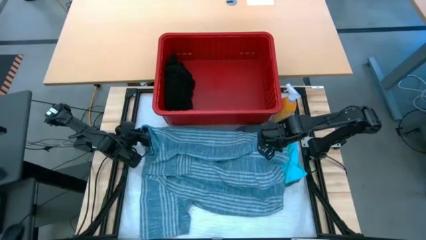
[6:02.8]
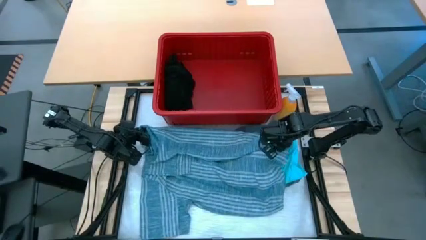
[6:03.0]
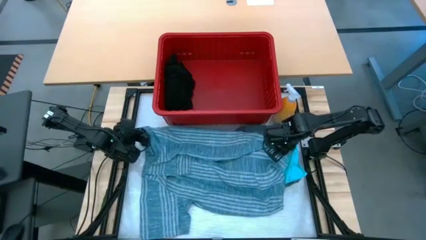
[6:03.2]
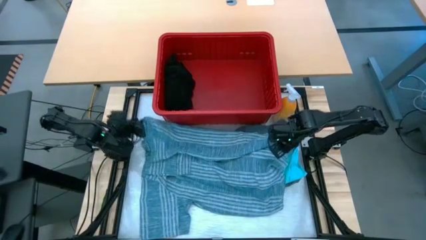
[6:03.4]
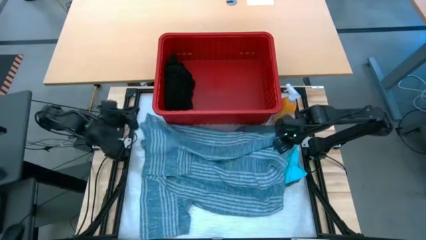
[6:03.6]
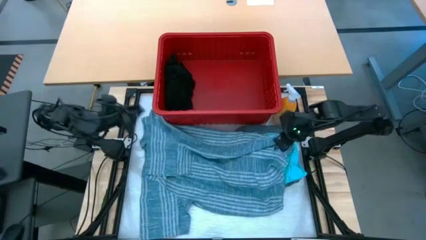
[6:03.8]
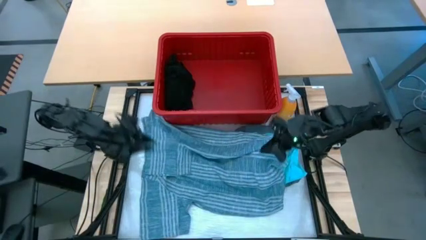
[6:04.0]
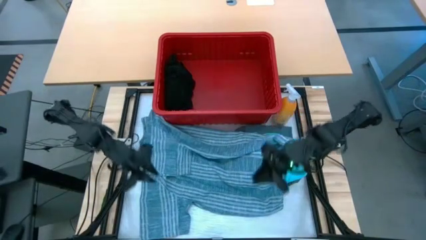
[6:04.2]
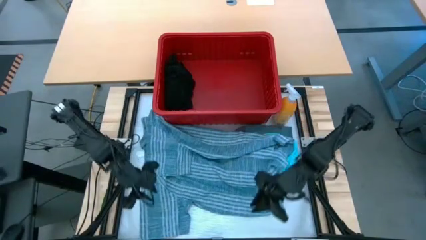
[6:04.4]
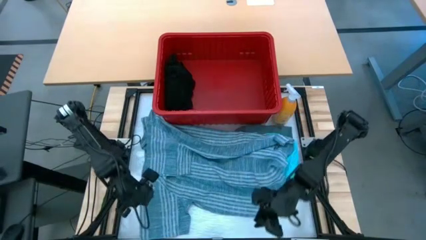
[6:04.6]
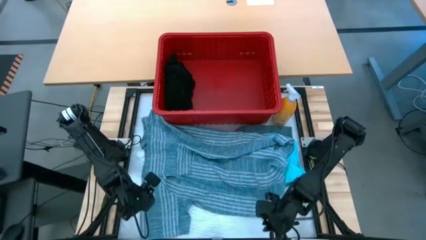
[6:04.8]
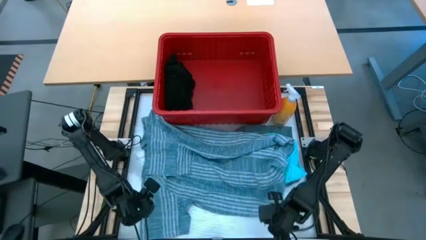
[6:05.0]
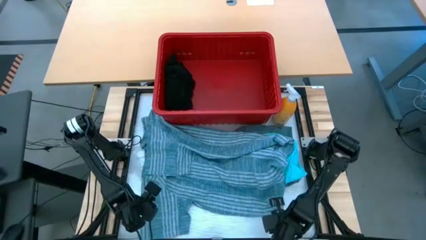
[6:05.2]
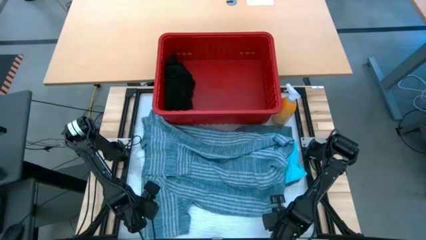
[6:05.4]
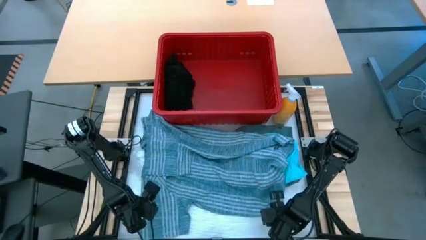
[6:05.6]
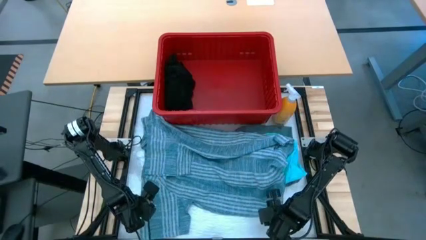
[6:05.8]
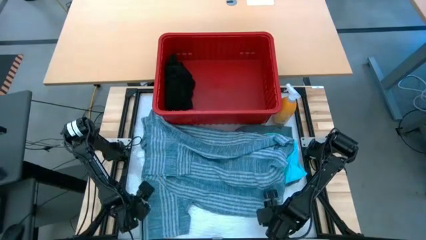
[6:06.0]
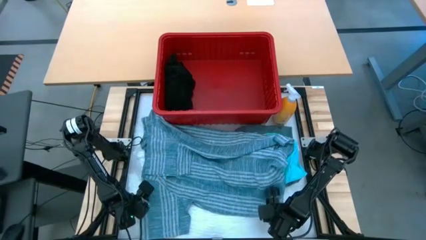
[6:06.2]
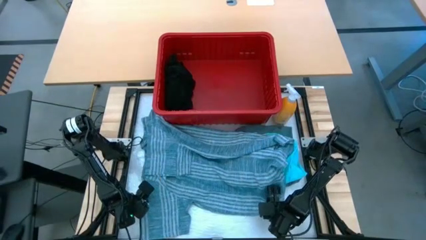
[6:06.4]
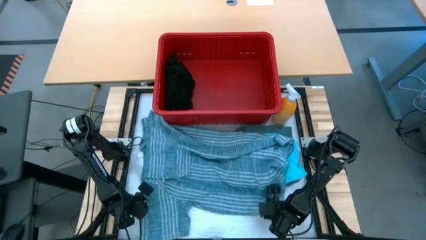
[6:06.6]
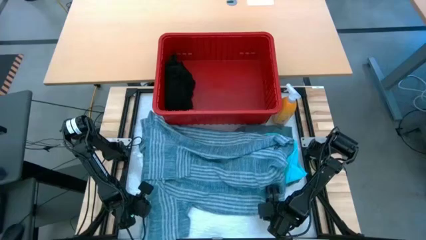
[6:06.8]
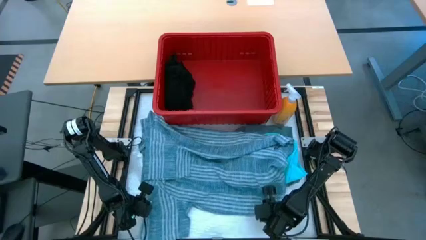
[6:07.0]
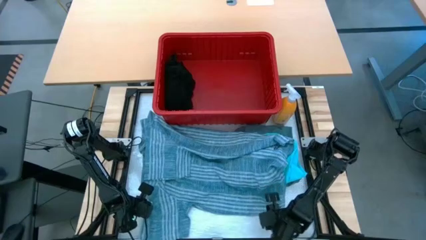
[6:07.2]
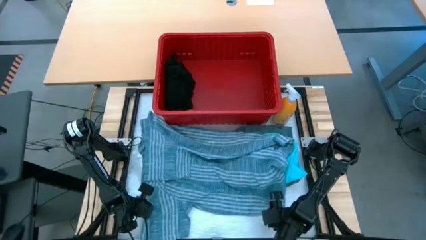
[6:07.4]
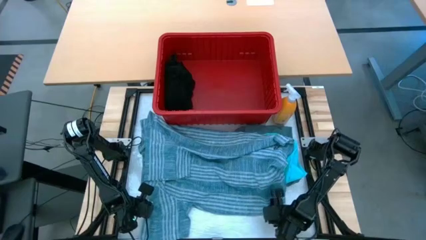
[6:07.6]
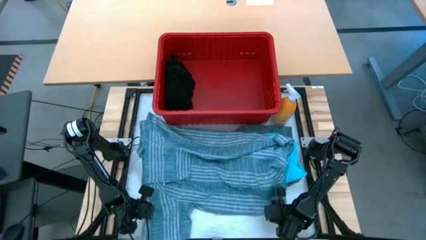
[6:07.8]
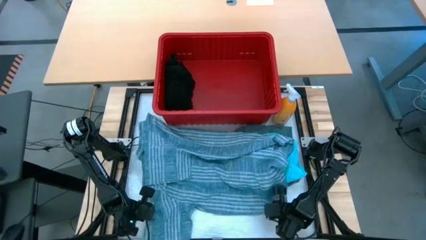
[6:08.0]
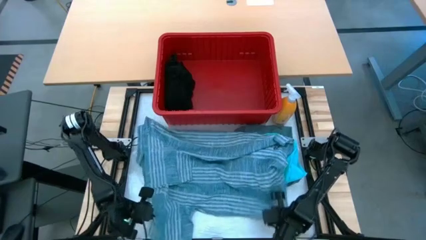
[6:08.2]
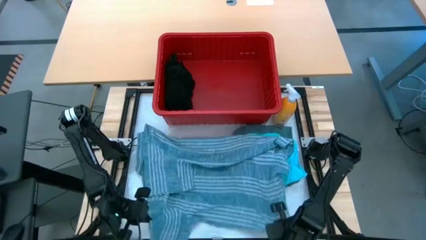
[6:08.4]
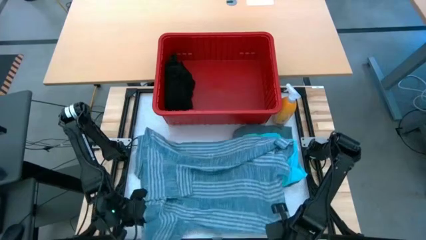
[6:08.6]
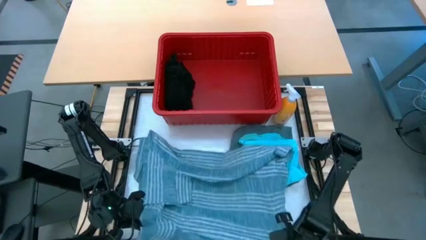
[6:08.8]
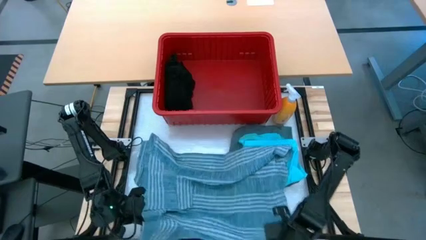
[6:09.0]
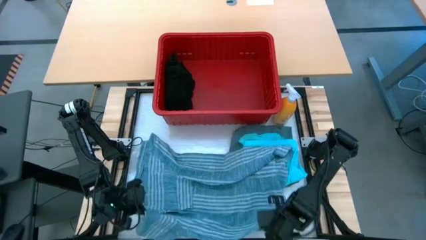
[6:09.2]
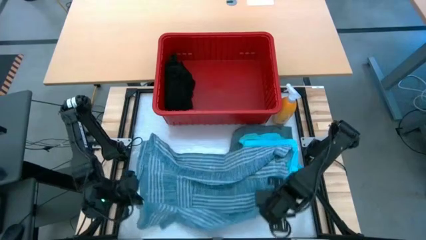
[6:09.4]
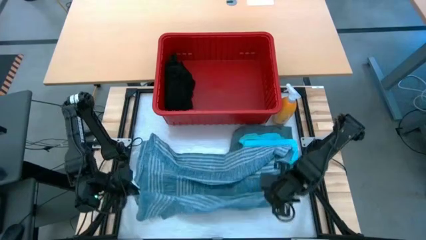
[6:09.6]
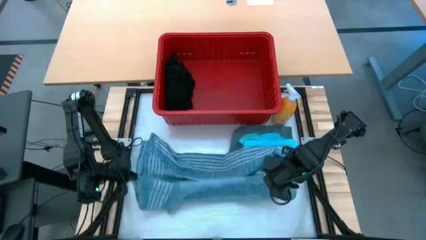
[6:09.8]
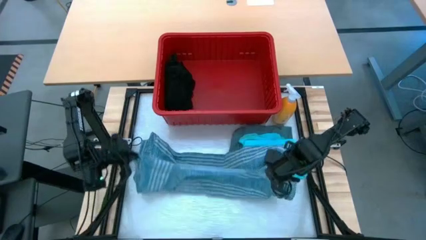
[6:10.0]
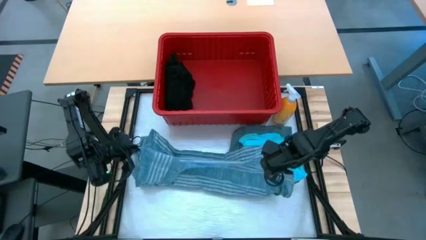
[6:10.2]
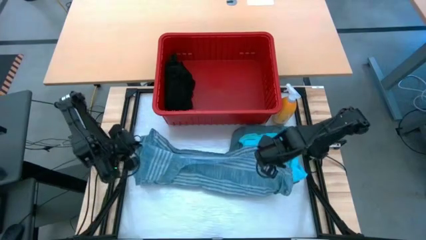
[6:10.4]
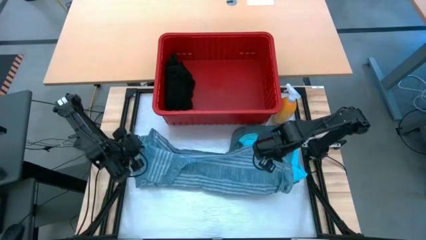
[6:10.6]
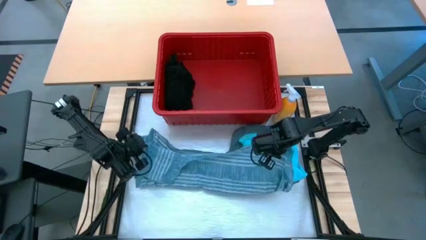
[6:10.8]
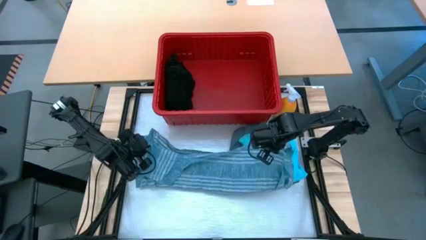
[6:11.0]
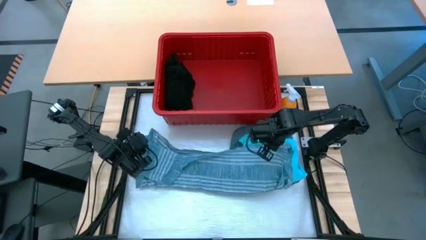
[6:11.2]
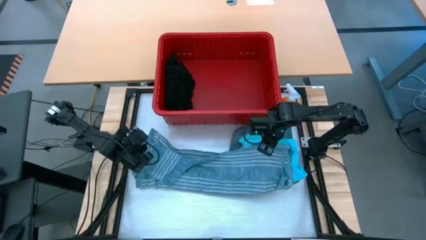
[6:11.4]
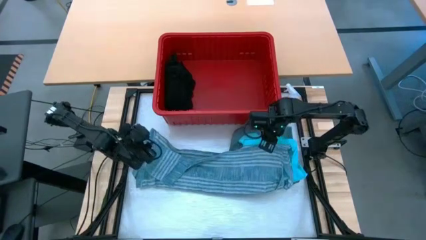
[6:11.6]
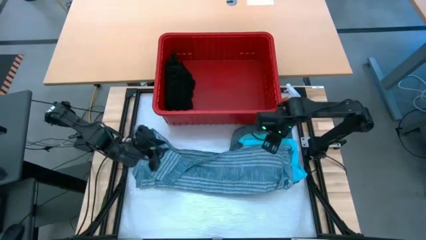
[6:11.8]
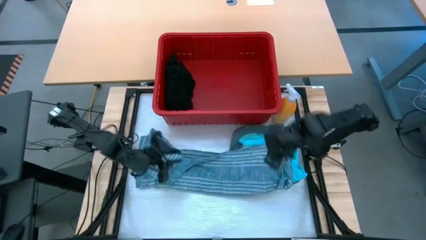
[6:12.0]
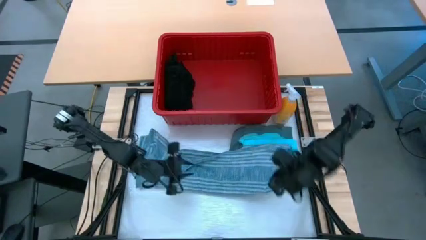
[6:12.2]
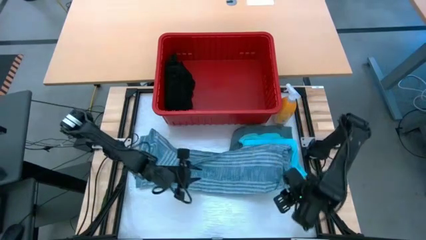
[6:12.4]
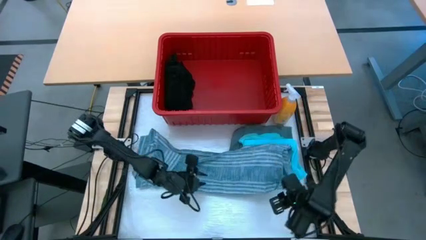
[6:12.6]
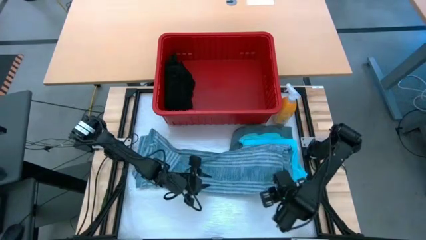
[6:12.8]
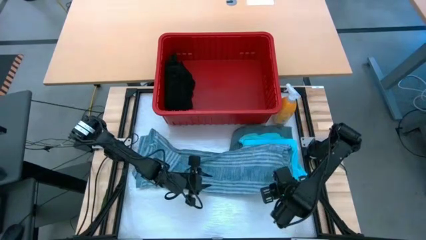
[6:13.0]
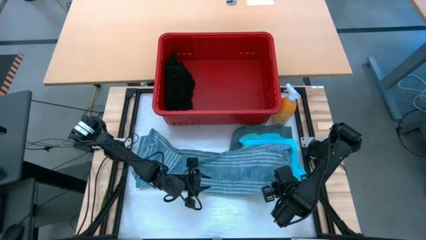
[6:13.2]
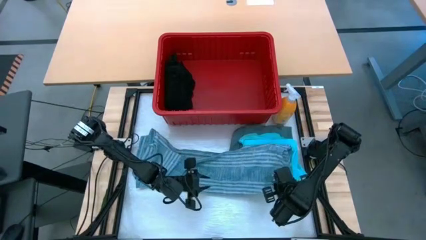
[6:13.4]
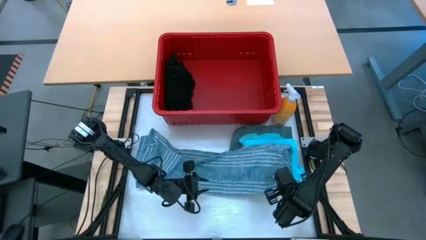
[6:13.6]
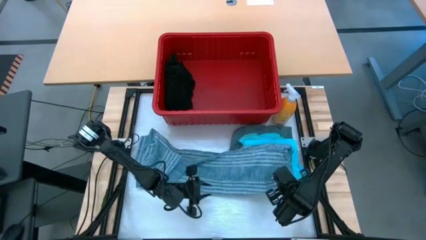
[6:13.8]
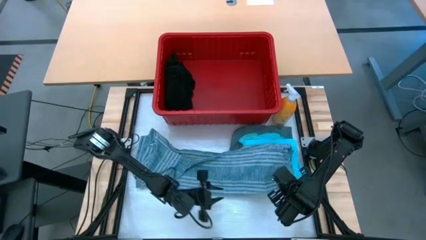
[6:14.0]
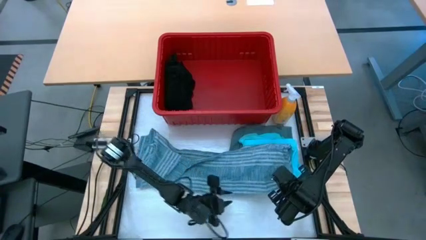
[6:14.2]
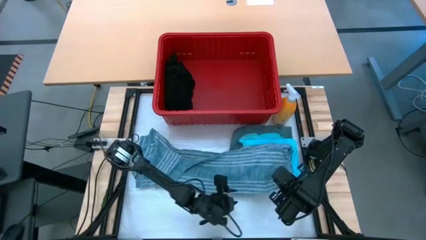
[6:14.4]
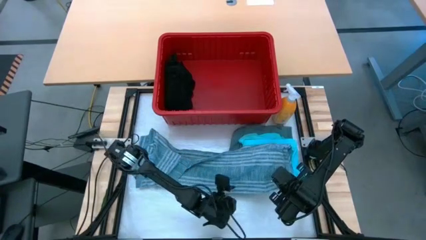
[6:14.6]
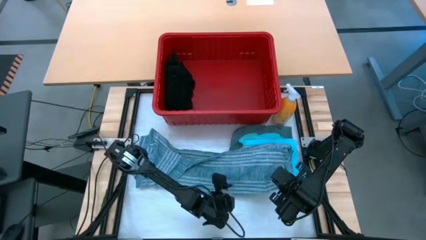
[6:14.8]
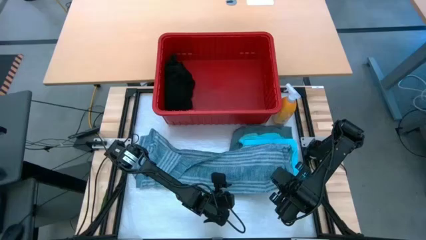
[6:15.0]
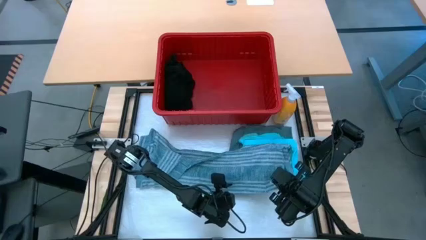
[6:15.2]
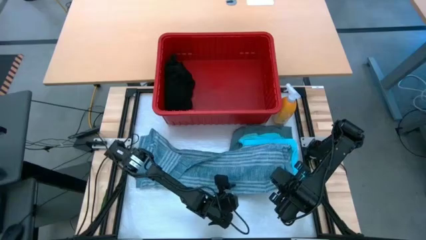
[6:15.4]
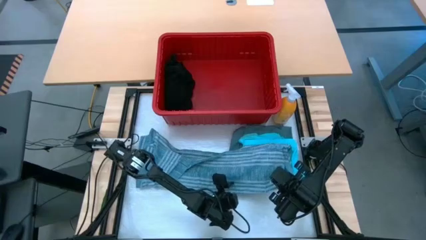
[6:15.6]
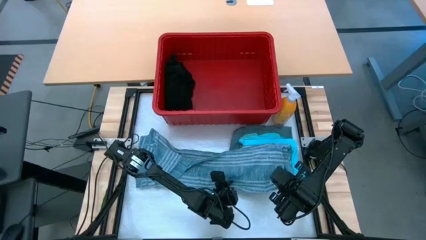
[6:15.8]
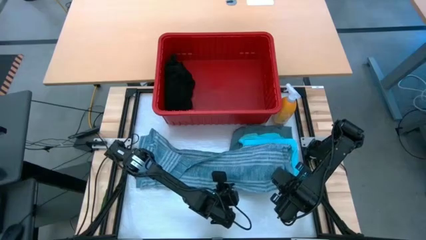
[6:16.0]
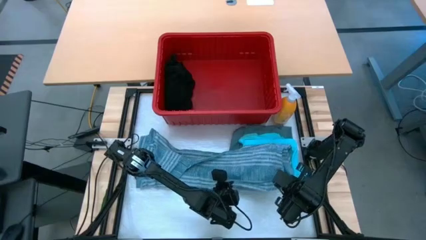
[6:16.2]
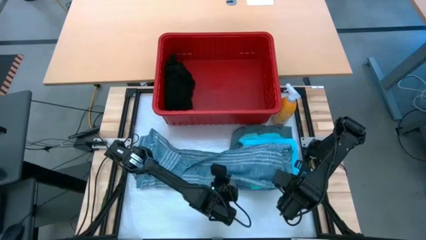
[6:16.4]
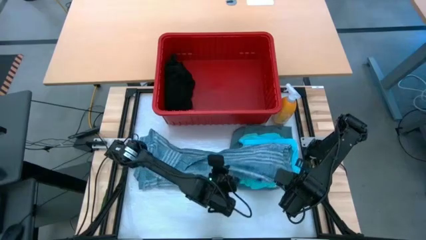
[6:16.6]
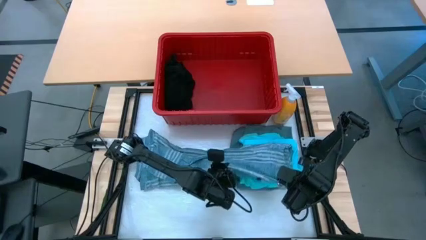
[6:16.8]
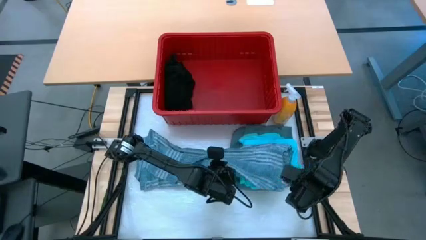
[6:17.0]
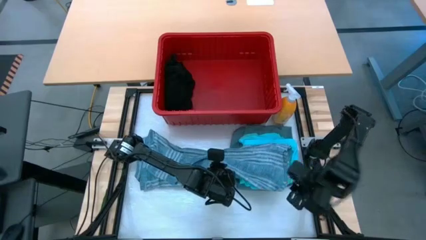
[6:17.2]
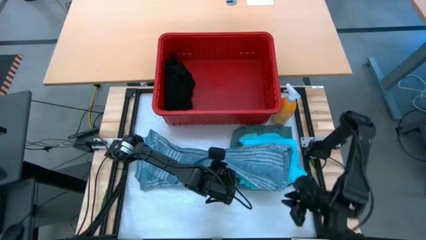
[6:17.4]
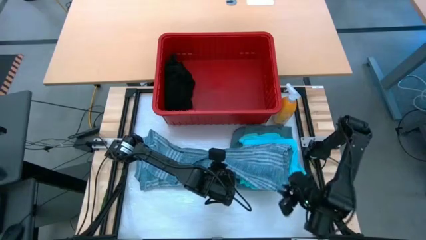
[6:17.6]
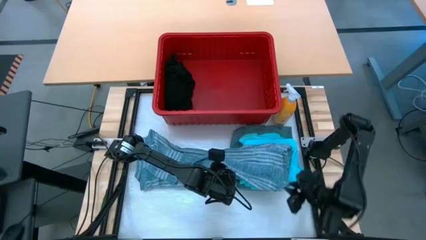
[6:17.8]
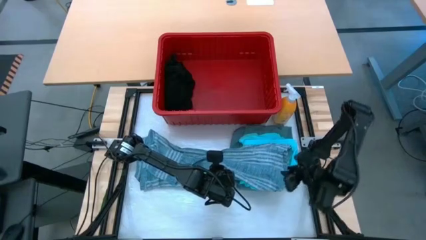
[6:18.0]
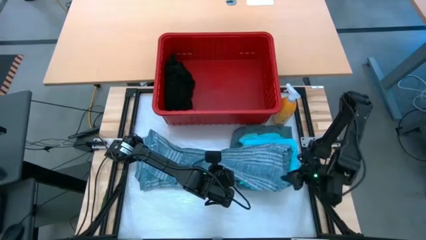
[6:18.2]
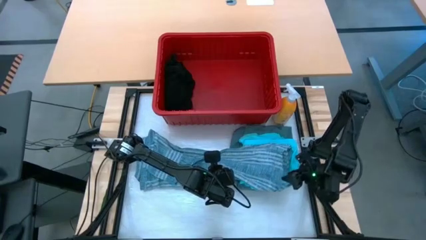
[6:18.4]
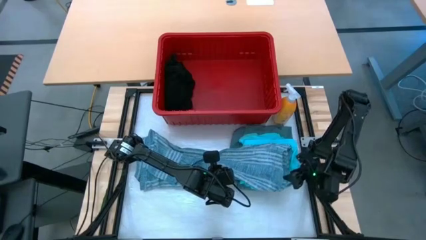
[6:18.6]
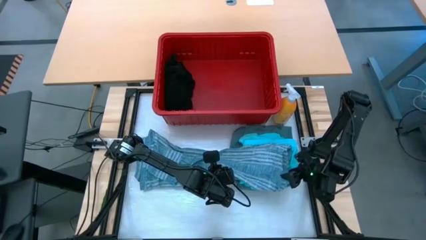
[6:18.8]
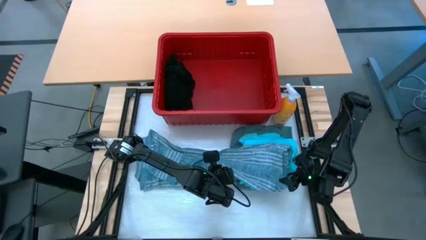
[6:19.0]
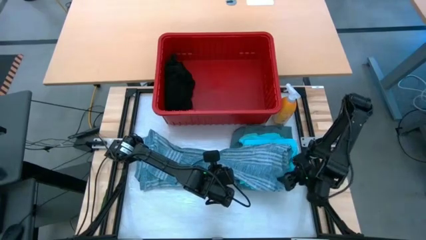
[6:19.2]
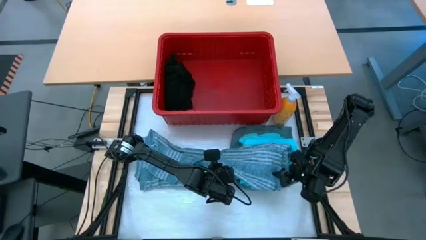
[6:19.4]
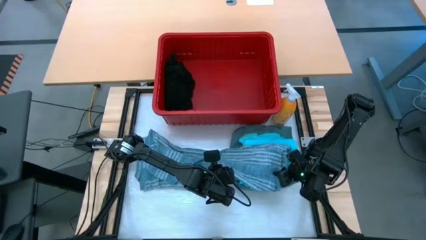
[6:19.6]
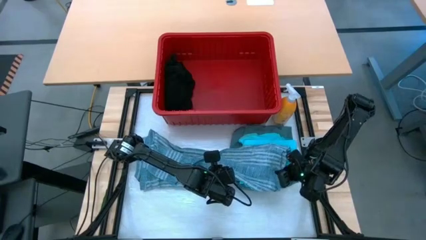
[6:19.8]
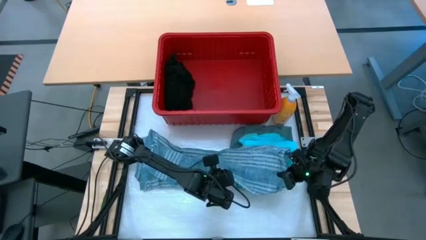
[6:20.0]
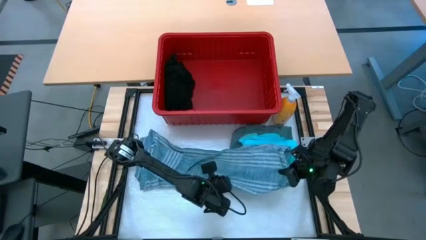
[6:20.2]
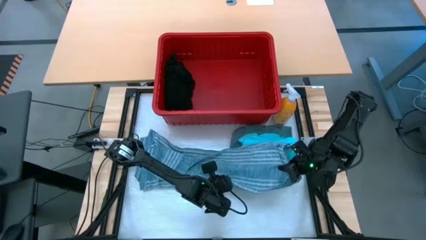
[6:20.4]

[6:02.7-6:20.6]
Task: Fold Laundry from Bin
Fold the blue shirt
